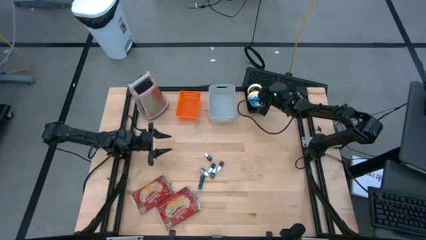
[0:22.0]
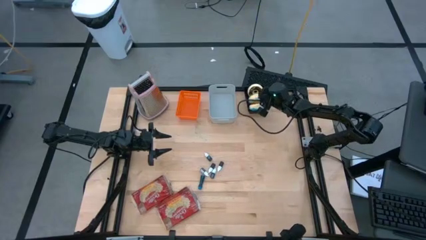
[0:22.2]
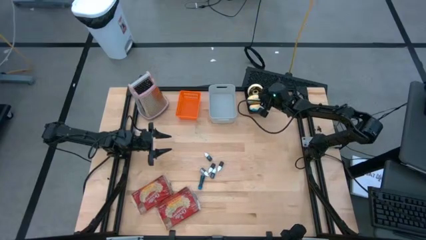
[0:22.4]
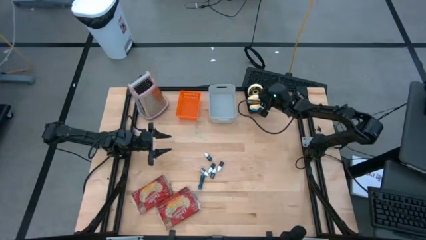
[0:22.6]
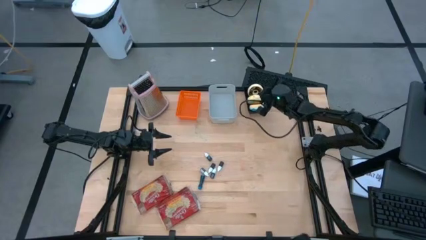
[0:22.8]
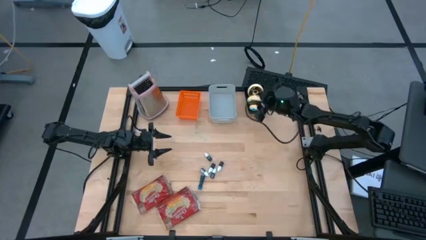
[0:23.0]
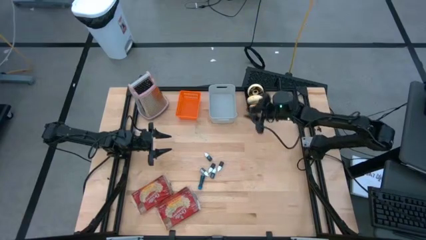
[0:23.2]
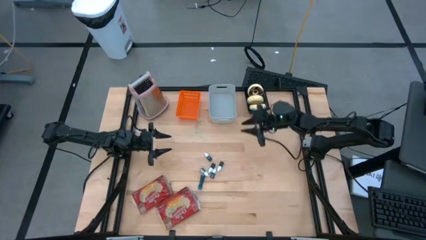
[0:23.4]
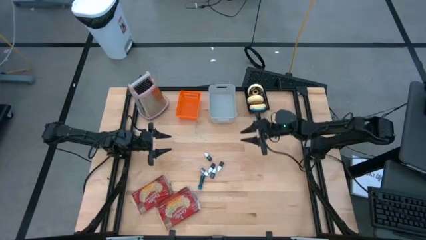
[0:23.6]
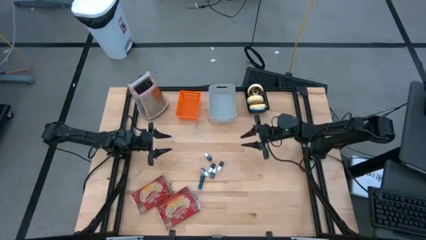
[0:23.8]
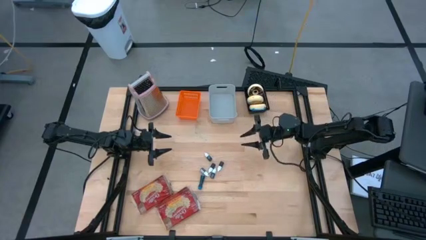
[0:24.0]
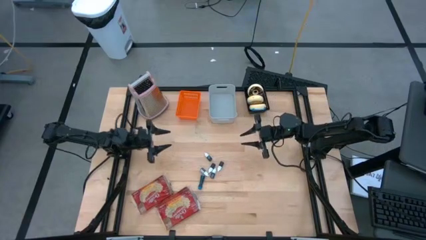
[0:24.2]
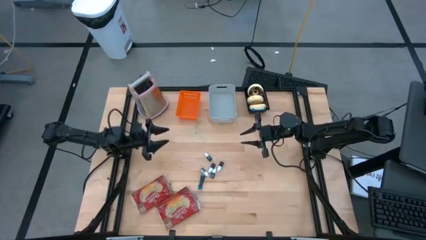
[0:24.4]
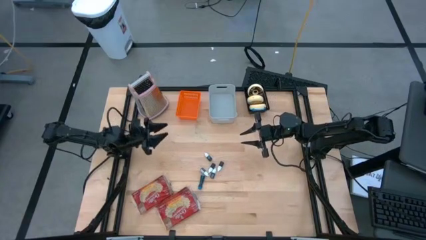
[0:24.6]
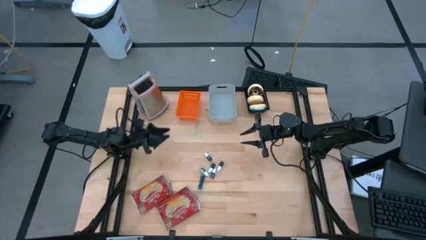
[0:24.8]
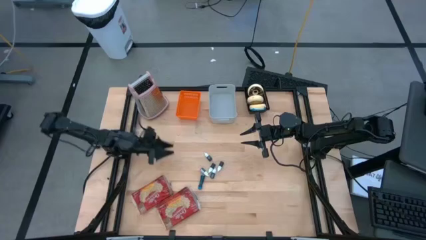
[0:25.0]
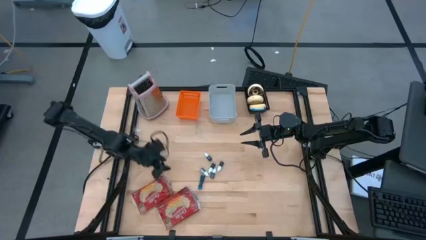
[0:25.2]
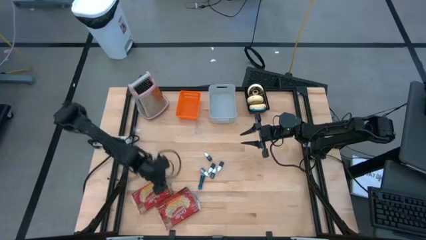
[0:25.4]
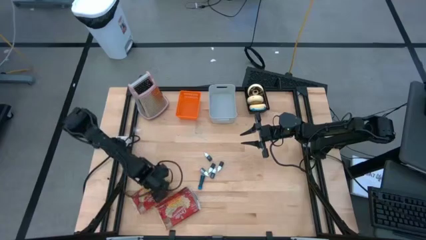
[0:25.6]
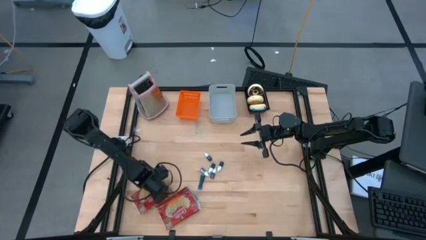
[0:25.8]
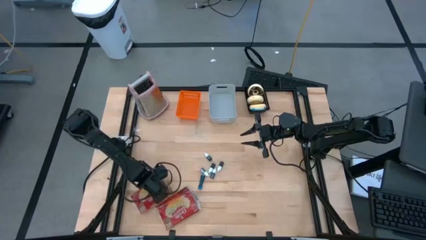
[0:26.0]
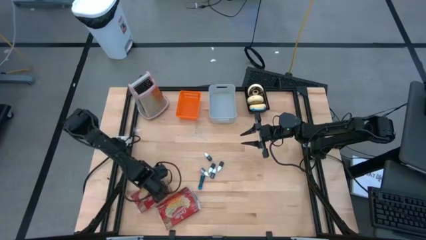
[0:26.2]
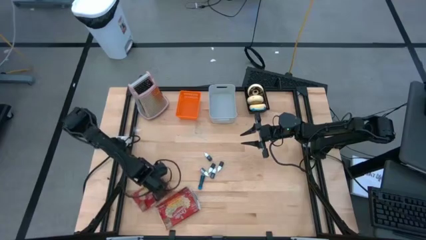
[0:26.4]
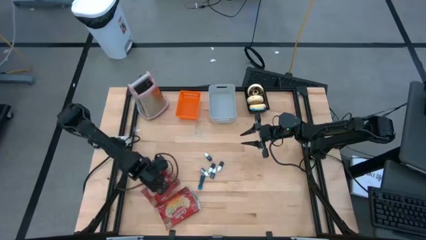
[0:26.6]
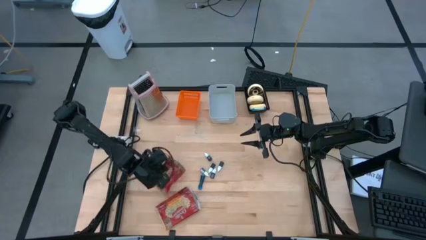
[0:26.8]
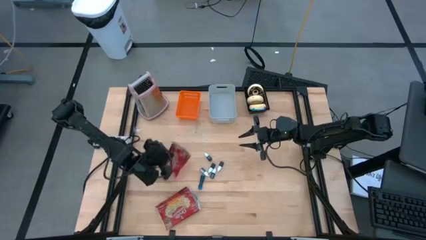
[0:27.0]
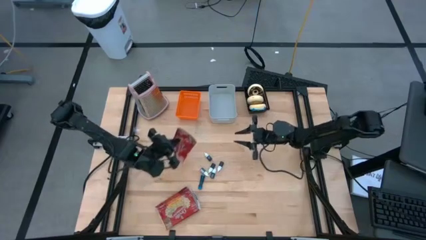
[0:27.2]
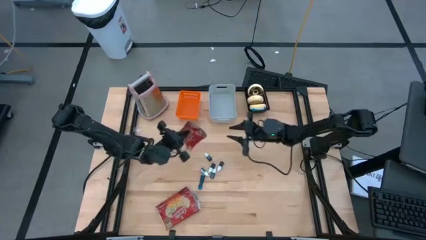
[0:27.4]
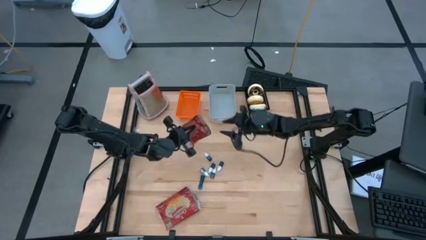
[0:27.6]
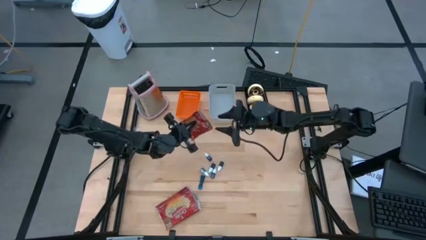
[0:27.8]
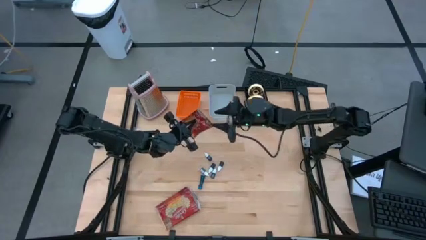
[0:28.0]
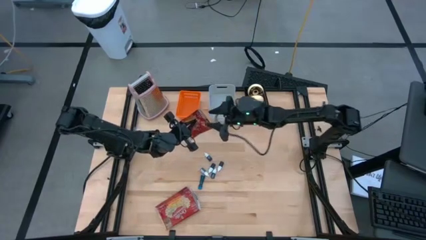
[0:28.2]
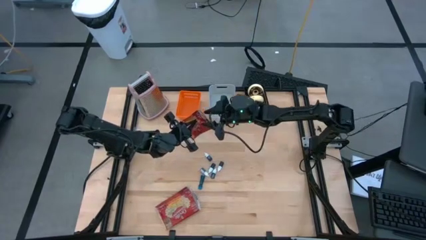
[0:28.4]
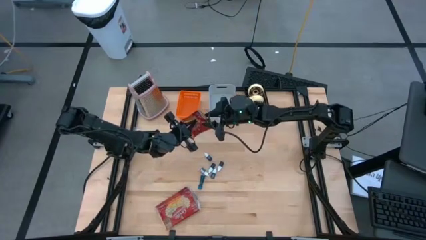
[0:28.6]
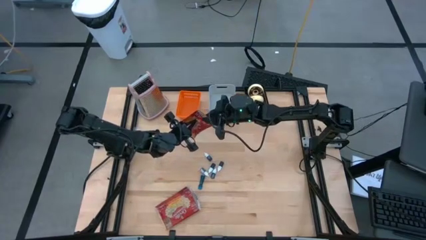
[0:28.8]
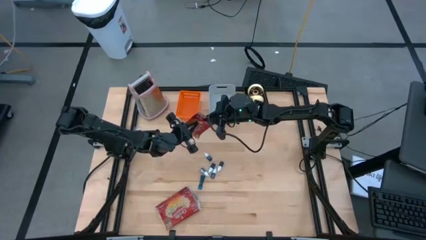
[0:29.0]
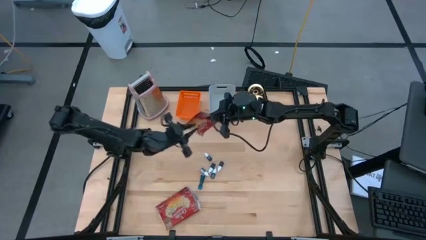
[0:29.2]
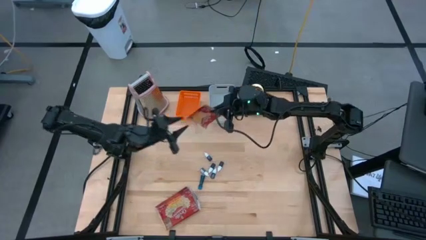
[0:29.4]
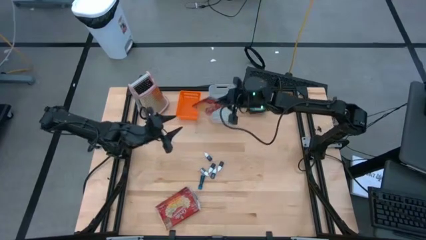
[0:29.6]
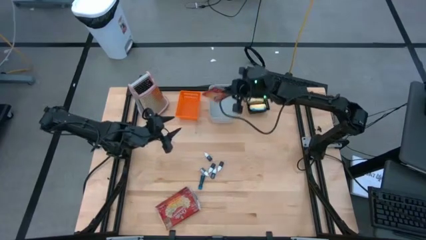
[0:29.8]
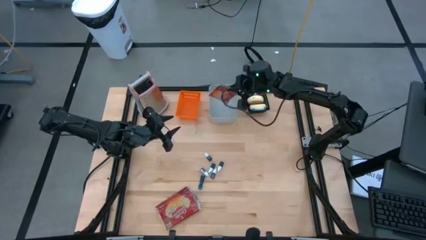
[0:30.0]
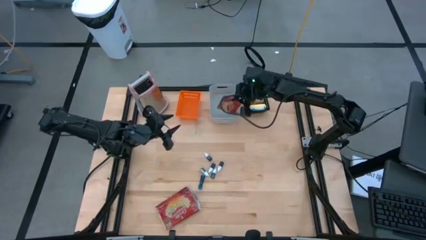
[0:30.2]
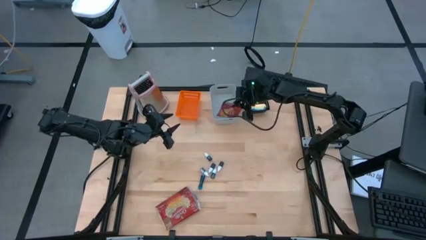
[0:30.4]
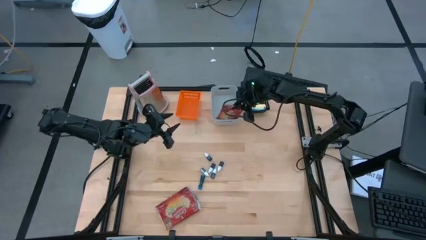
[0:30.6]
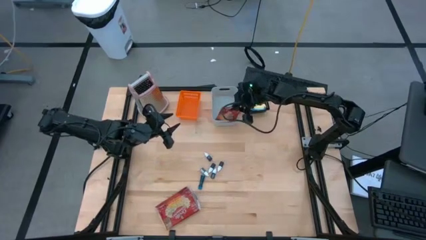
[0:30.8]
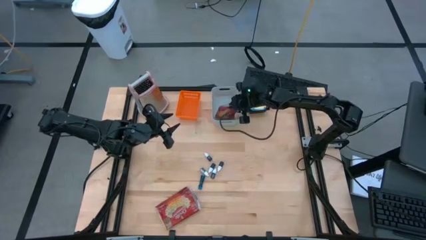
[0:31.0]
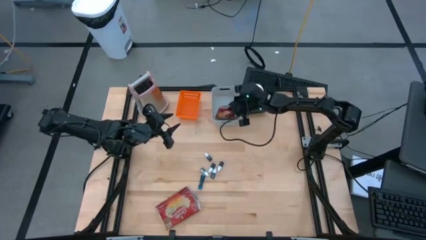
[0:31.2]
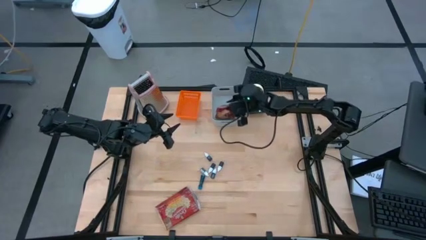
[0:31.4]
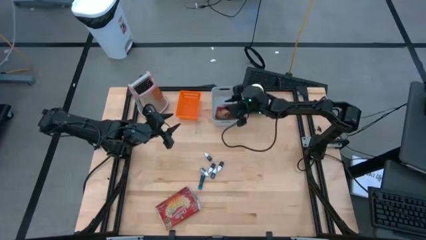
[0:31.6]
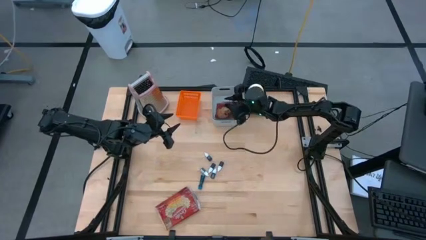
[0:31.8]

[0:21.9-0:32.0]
Put the red popcorn package into the gray bin
